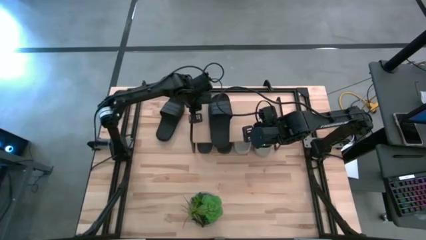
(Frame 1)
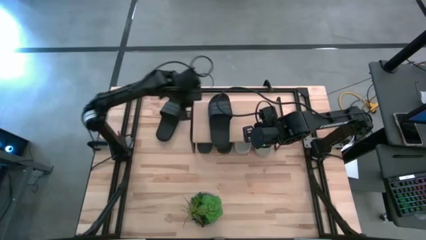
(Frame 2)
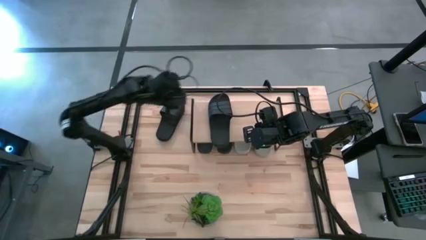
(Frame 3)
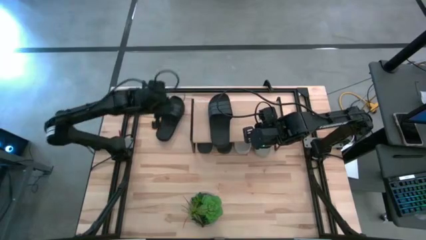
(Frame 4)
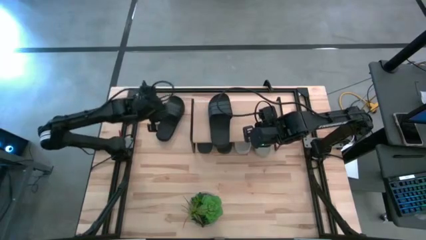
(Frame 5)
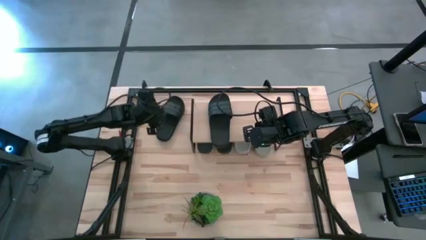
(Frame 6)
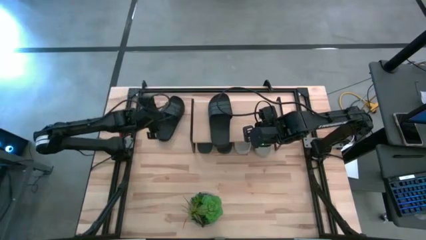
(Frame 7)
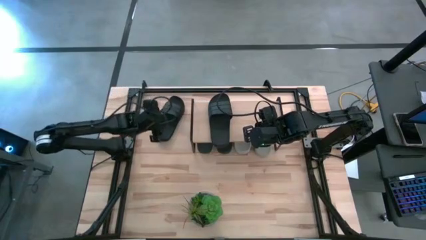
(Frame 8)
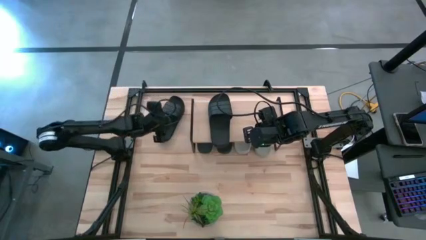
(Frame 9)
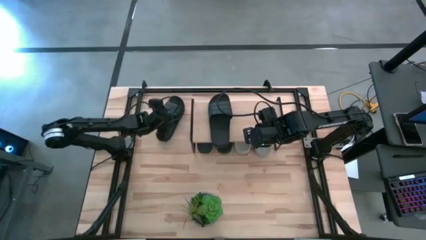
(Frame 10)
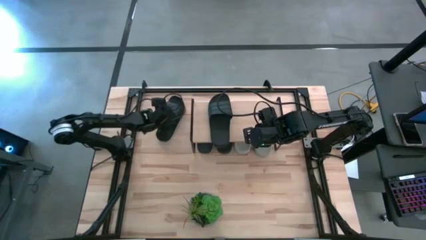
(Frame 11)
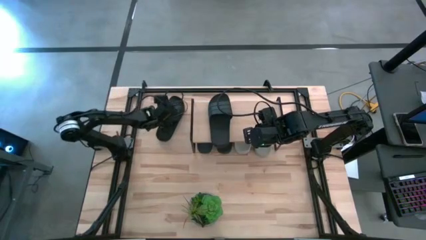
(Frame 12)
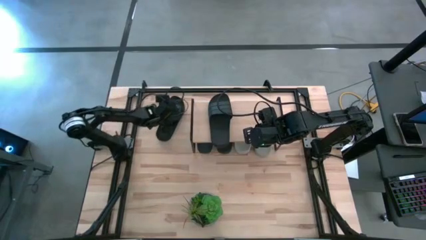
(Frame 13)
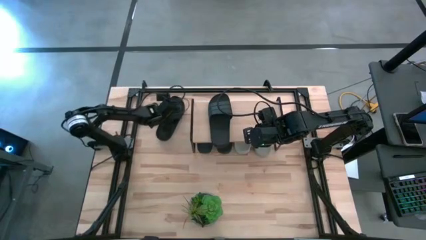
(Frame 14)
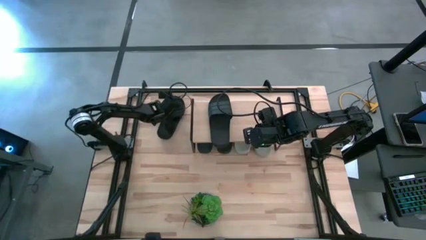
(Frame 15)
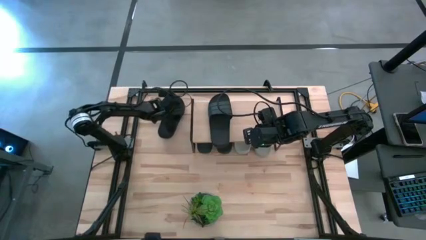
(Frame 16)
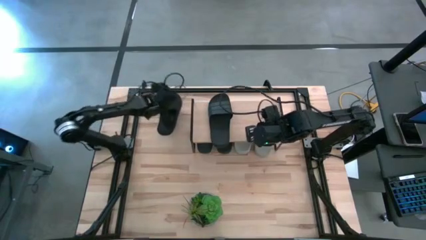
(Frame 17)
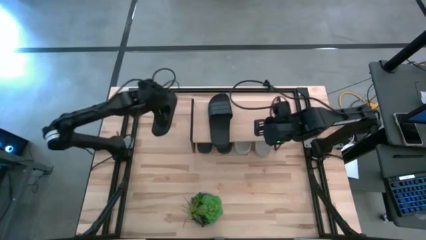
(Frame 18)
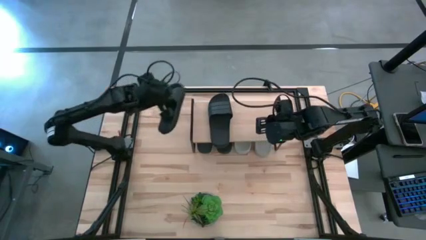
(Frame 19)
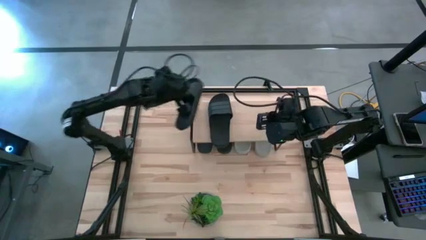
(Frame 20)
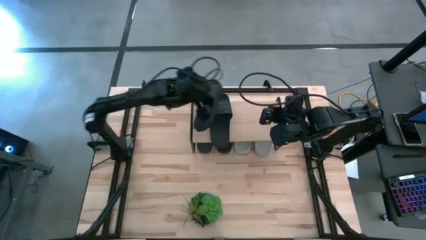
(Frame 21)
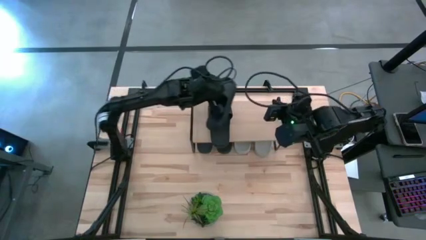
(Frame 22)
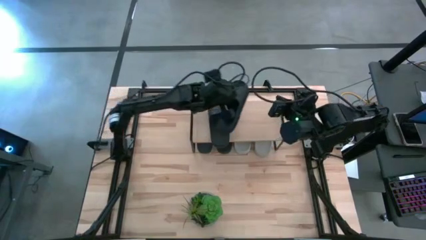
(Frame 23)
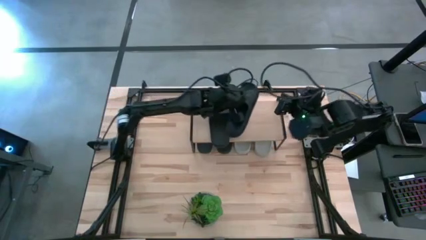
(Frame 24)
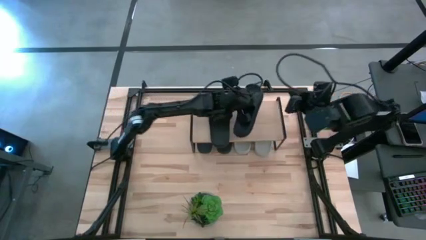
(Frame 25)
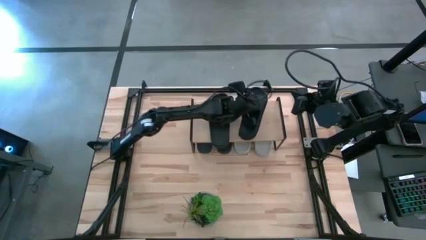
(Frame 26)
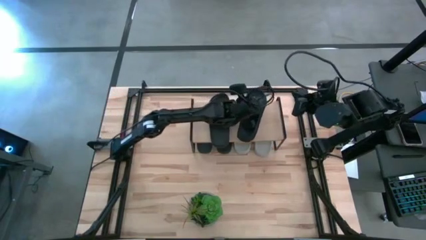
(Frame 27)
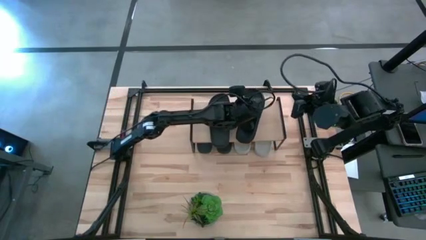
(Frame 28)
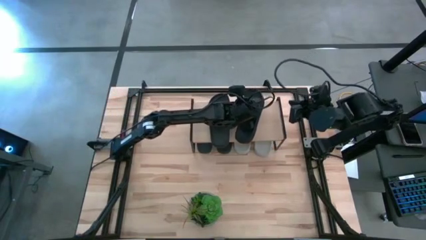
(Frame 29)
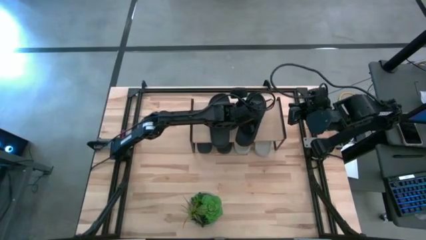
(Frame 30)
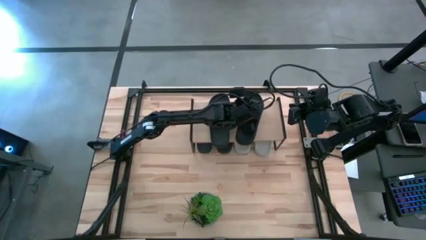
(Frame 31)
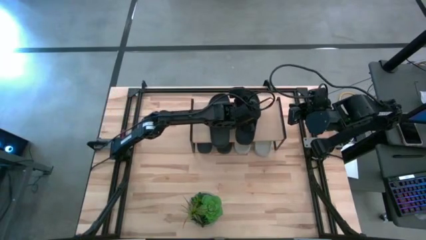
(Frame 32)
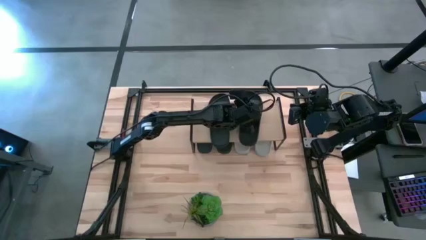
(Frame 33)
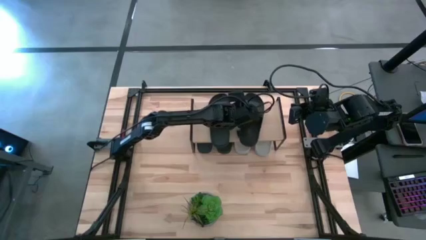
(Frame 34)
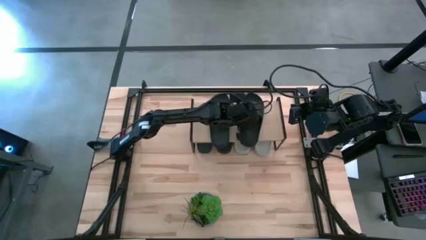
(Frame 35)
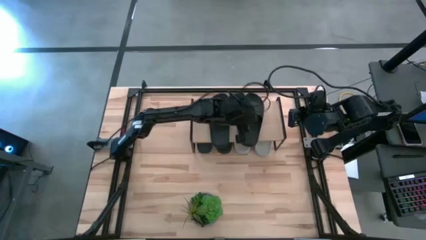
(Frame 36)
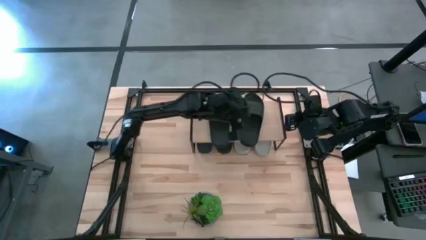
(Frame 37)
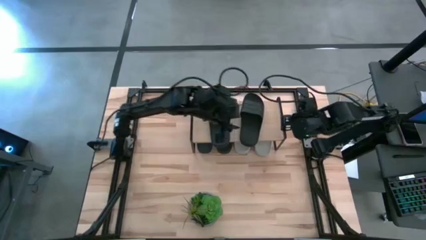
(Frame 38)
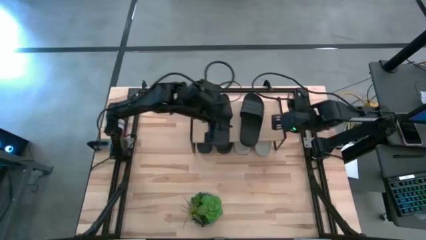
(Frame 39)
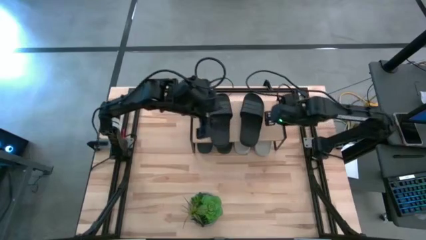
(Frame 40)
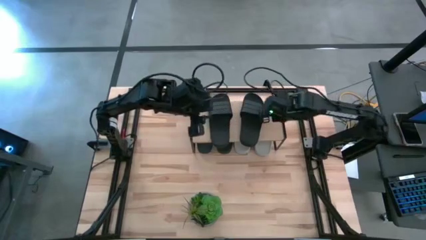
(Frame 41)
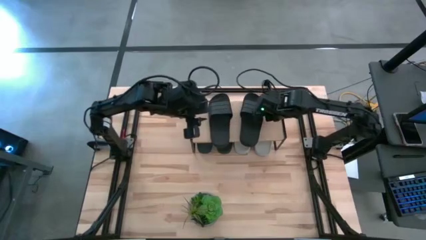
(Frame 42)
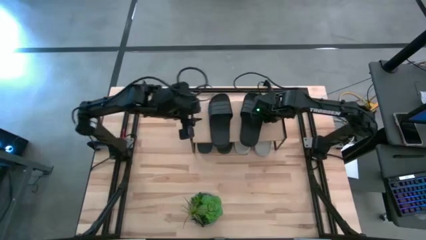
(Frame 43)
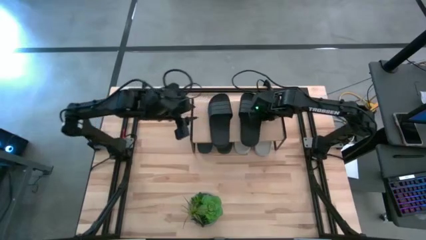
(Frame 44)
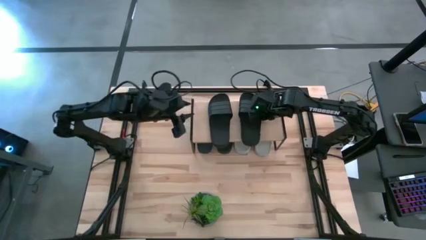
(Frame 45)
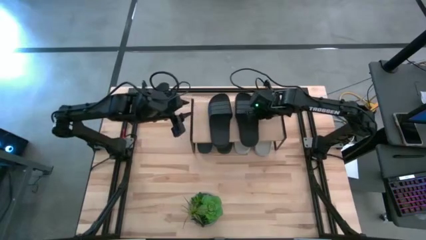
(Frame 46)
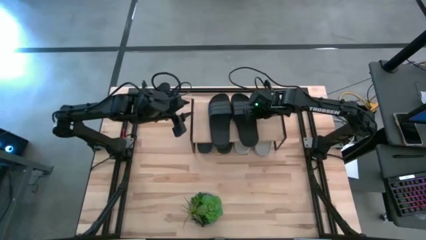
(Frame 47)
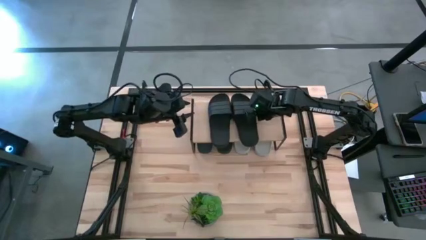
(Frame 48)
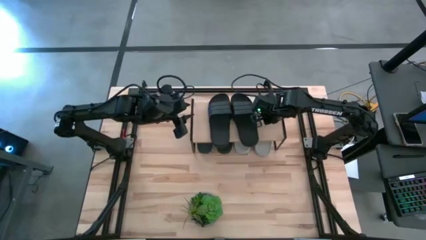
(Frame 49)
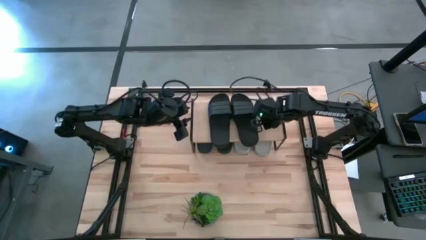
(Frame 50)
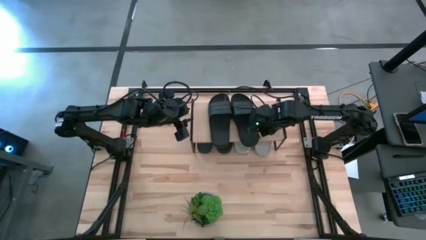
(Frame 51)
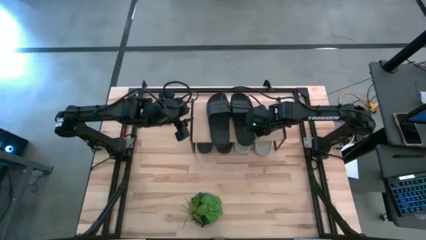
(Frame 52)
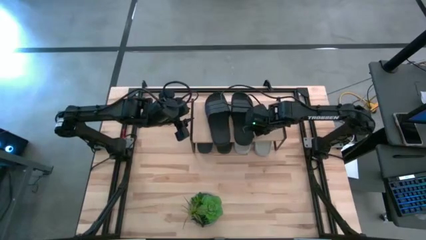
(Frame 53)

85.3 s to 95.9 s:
Task: Pick and place slides into the shelf
Put the black slide on the shelf

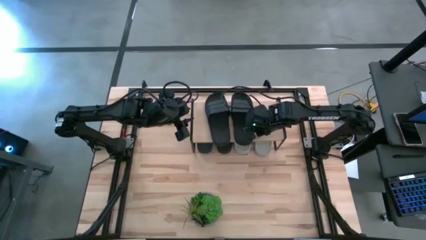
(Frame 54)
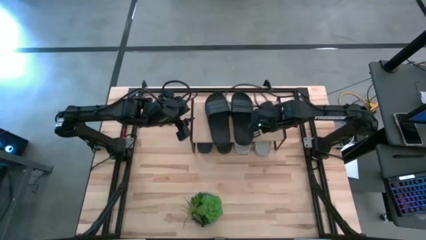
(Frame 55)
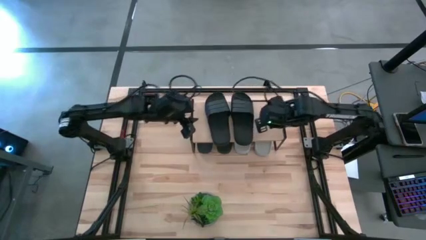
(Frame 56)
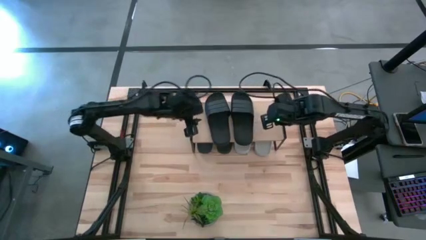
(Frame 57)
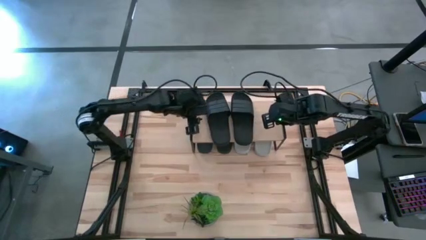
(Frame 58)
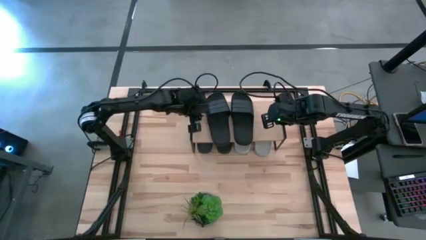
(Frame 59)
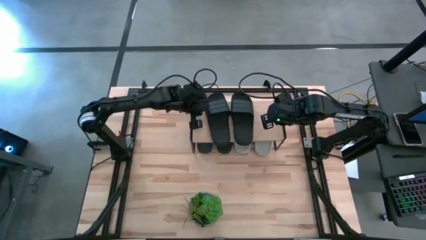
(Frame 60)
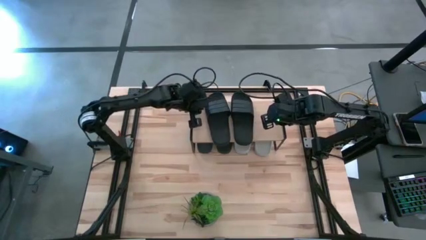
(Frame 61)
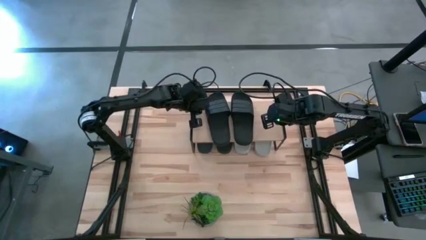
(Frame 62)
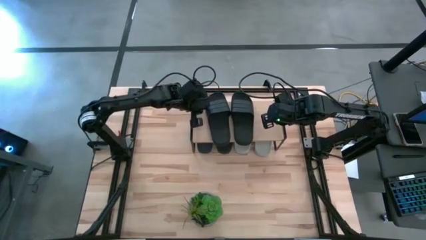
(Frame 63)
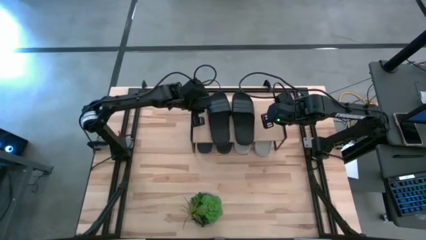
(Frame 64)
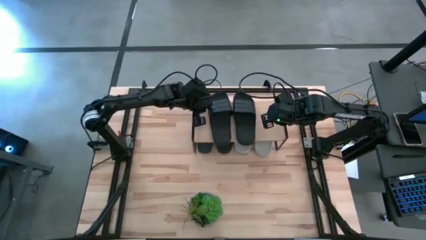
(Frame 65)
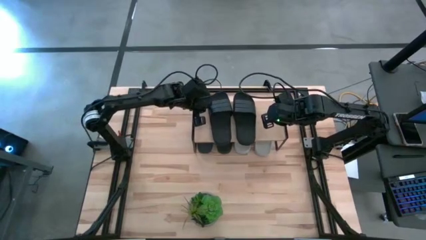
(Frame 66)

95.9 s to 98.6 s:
Adjust the black slide on the shelf
